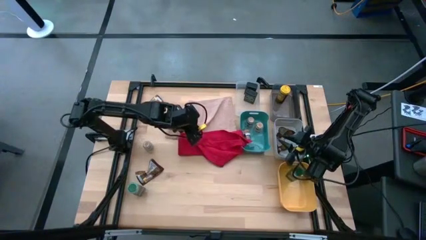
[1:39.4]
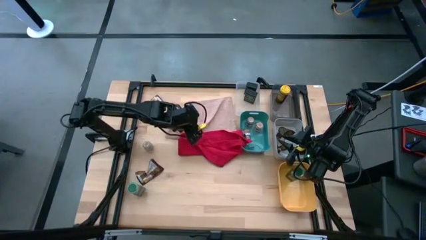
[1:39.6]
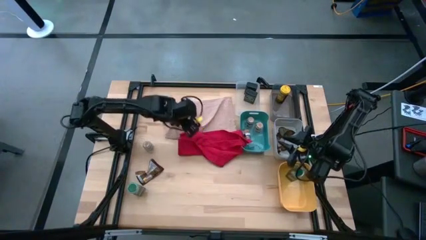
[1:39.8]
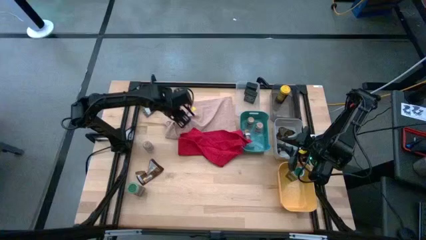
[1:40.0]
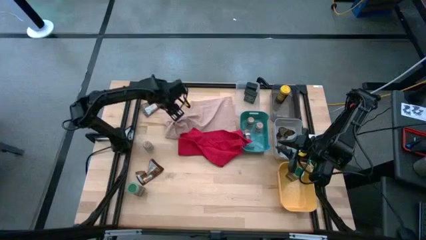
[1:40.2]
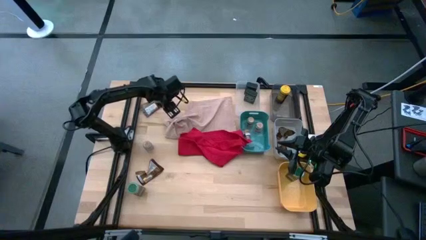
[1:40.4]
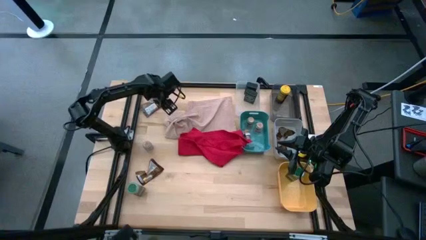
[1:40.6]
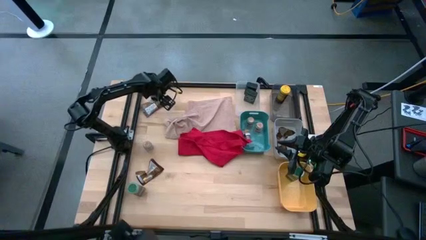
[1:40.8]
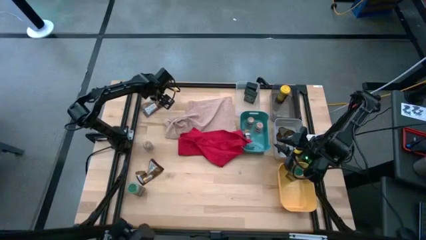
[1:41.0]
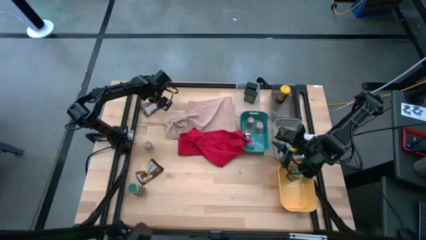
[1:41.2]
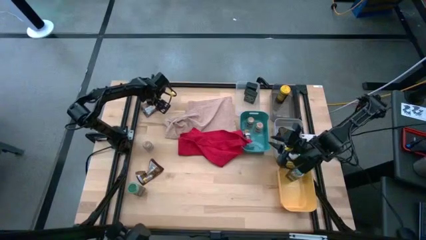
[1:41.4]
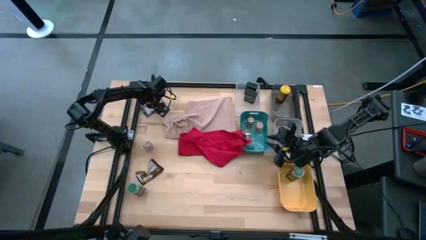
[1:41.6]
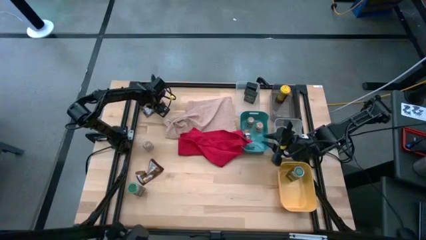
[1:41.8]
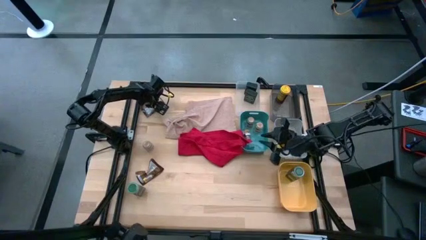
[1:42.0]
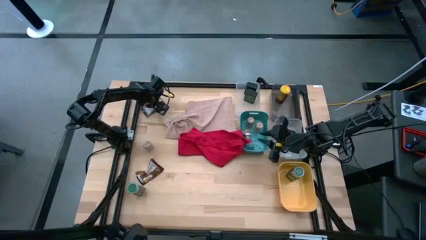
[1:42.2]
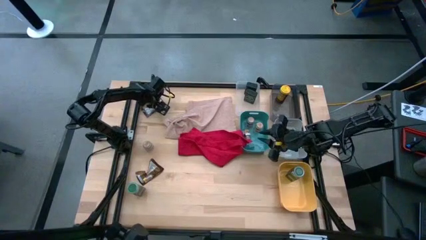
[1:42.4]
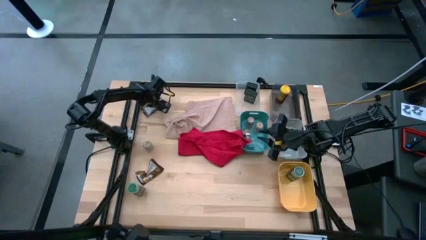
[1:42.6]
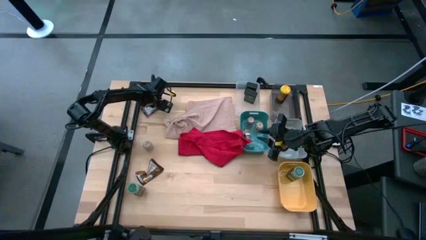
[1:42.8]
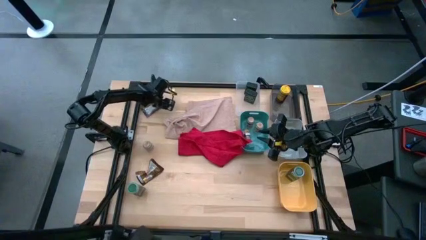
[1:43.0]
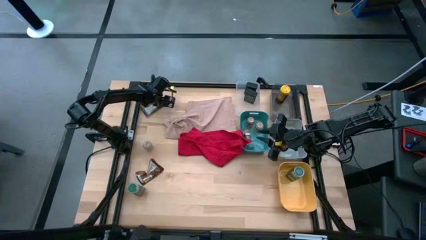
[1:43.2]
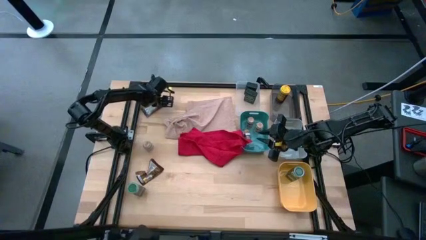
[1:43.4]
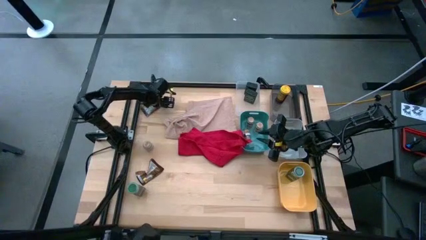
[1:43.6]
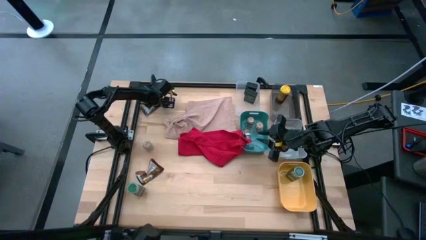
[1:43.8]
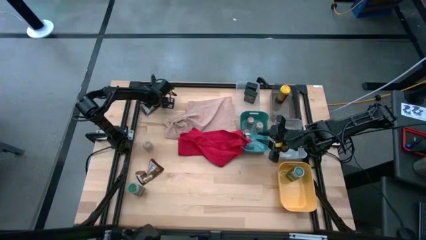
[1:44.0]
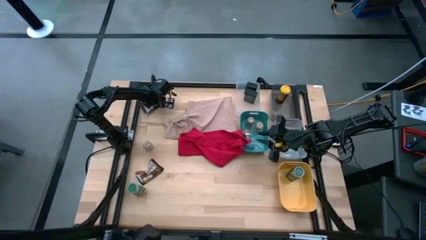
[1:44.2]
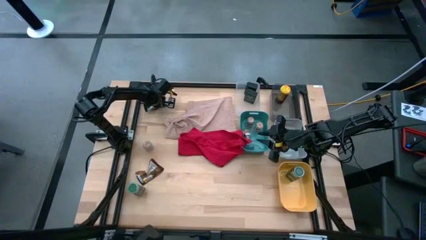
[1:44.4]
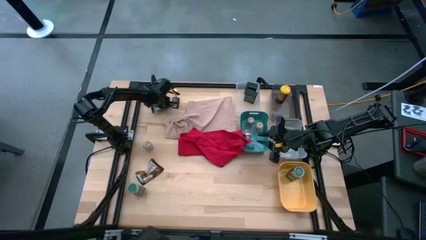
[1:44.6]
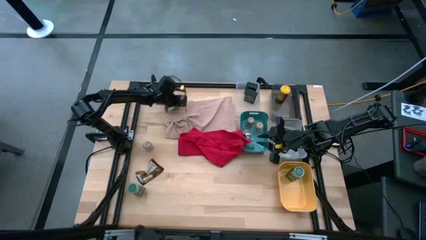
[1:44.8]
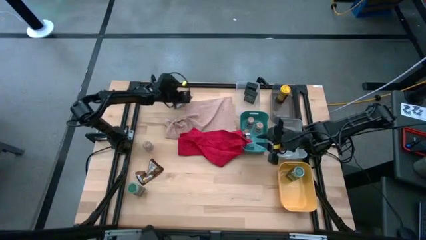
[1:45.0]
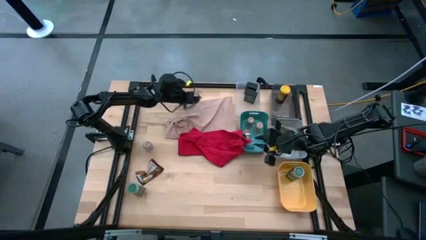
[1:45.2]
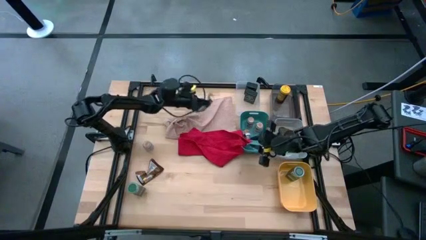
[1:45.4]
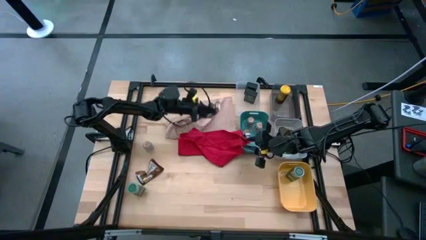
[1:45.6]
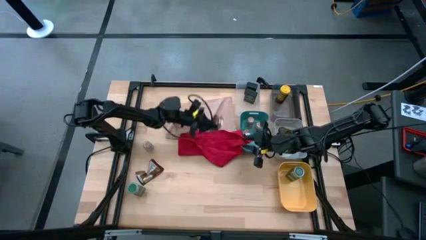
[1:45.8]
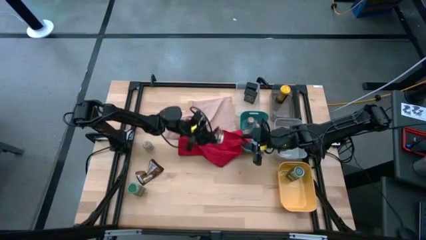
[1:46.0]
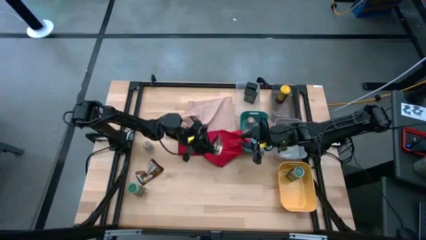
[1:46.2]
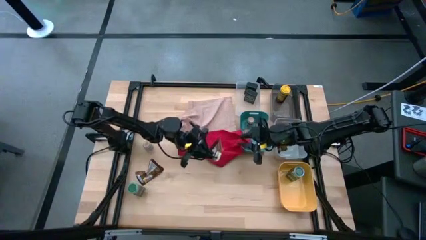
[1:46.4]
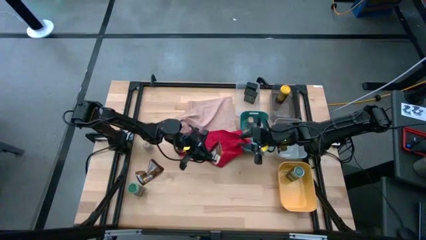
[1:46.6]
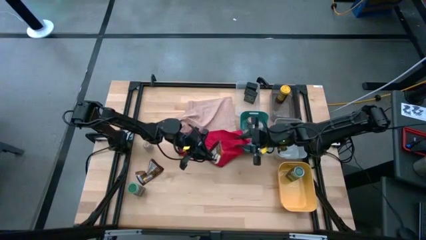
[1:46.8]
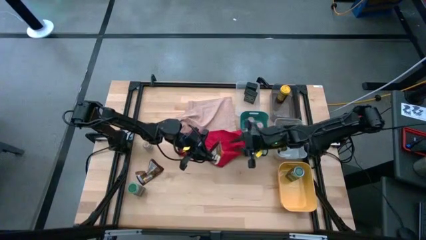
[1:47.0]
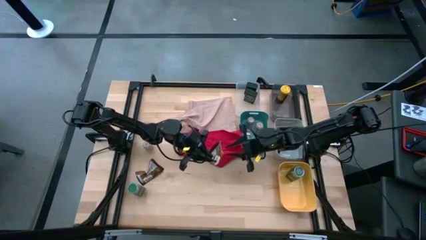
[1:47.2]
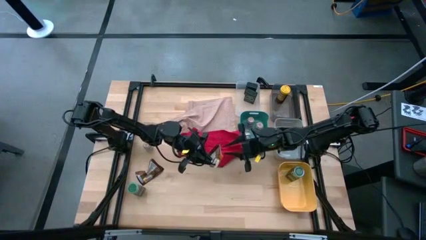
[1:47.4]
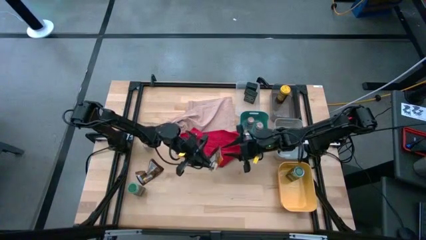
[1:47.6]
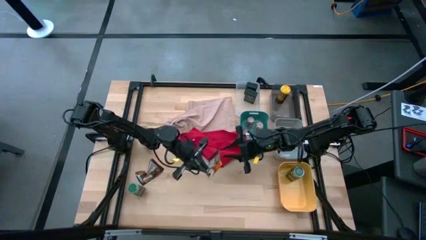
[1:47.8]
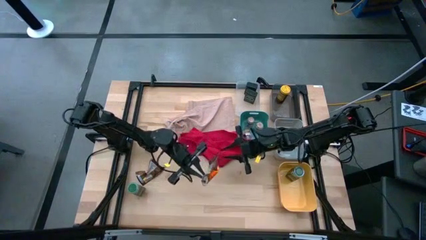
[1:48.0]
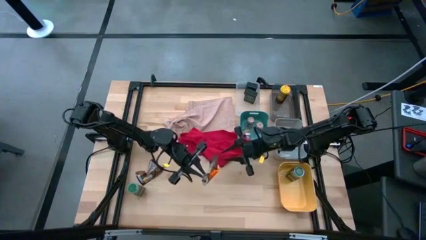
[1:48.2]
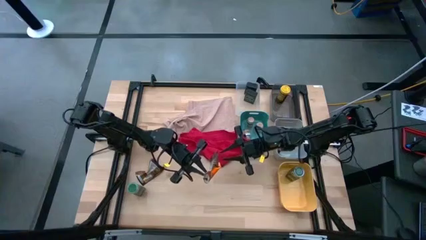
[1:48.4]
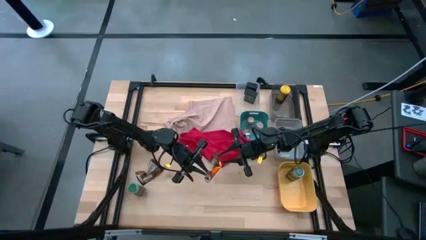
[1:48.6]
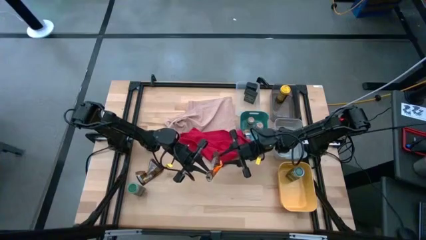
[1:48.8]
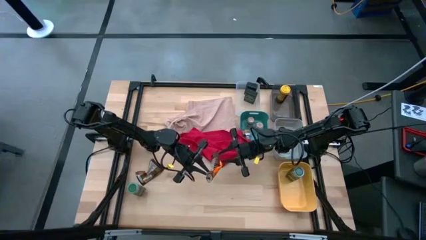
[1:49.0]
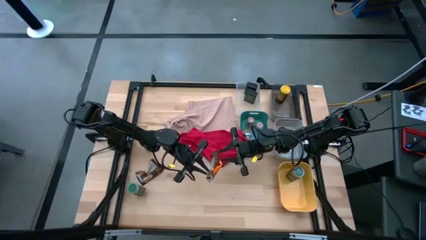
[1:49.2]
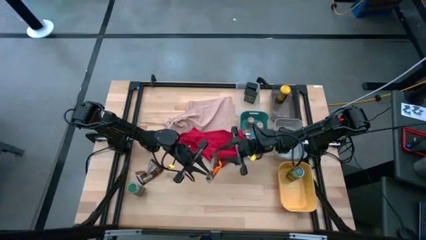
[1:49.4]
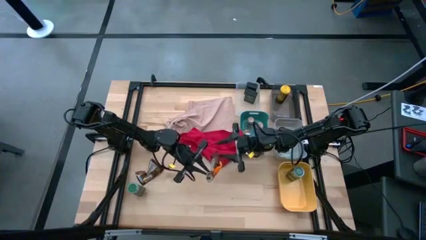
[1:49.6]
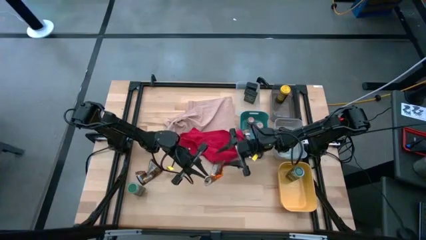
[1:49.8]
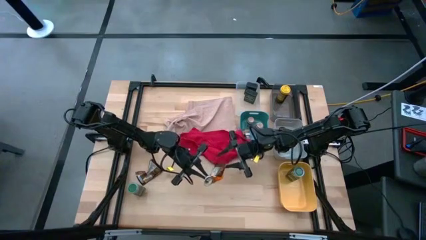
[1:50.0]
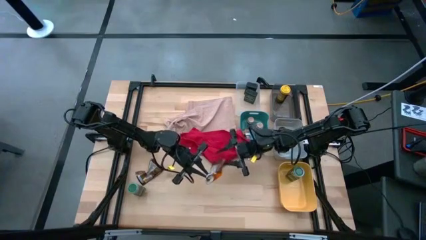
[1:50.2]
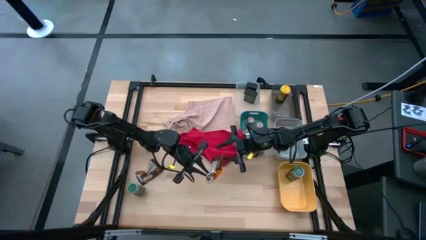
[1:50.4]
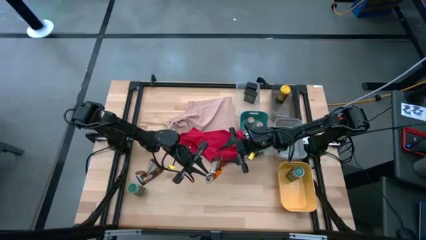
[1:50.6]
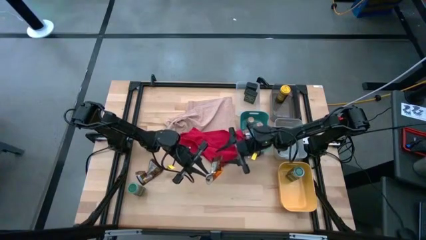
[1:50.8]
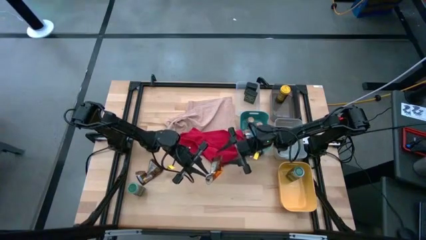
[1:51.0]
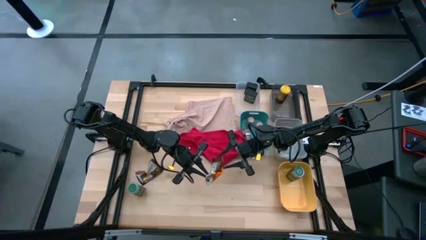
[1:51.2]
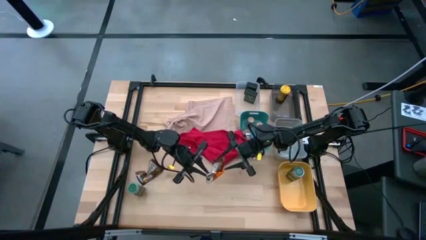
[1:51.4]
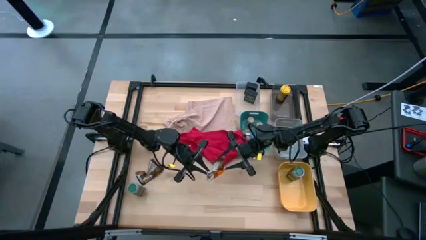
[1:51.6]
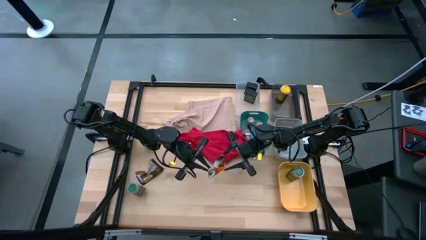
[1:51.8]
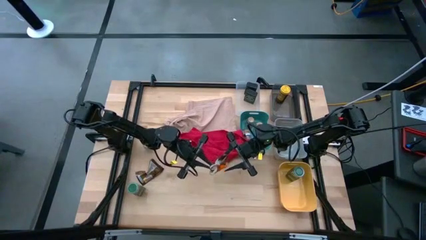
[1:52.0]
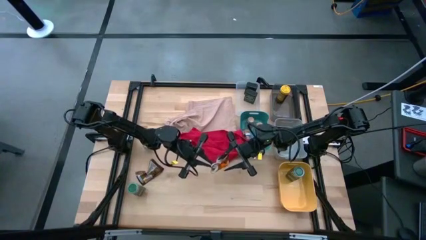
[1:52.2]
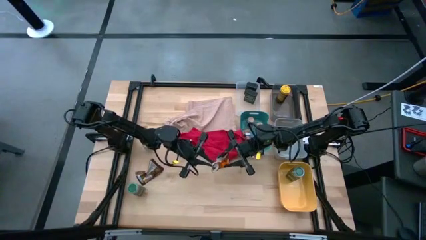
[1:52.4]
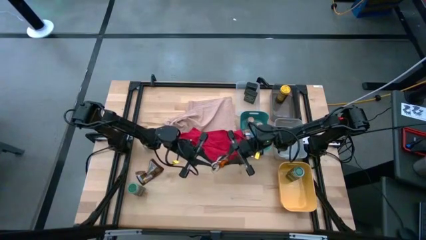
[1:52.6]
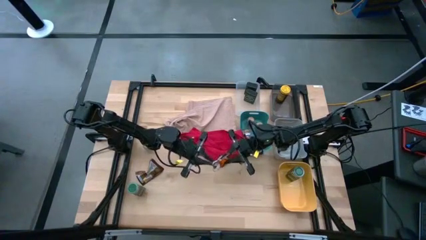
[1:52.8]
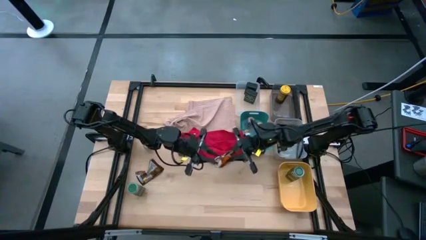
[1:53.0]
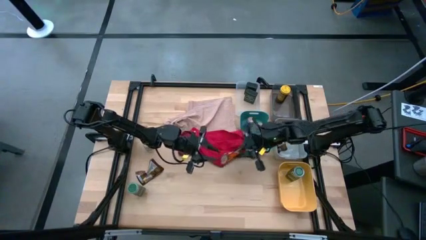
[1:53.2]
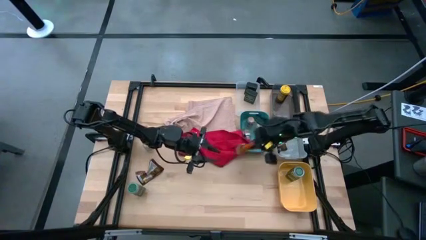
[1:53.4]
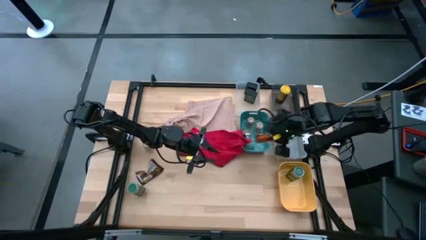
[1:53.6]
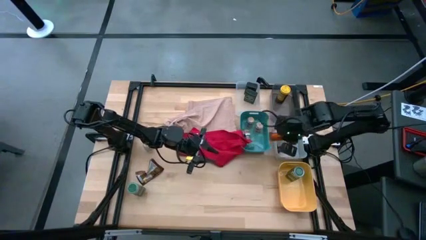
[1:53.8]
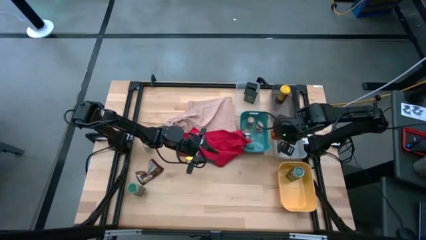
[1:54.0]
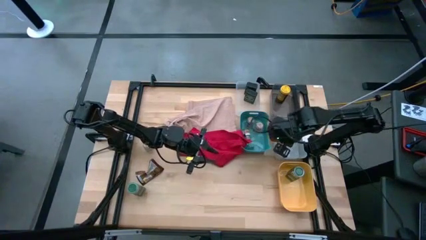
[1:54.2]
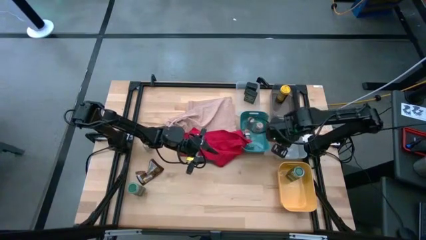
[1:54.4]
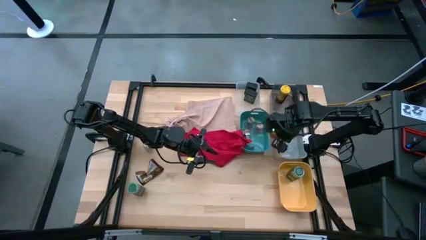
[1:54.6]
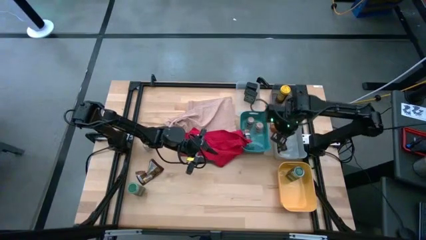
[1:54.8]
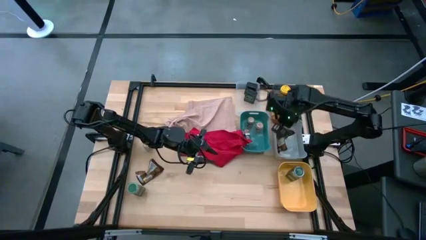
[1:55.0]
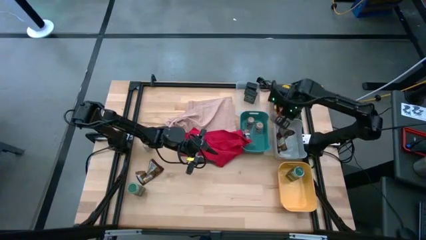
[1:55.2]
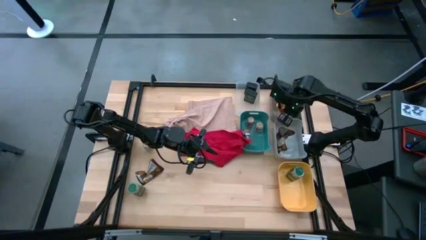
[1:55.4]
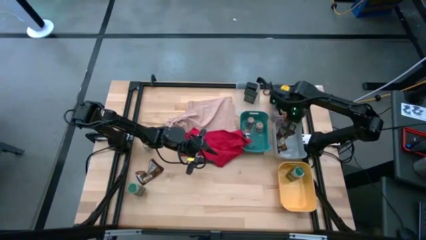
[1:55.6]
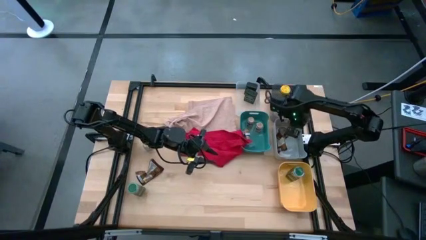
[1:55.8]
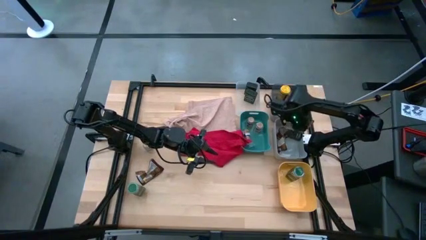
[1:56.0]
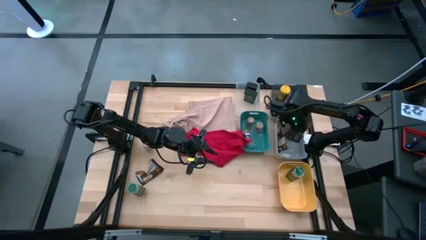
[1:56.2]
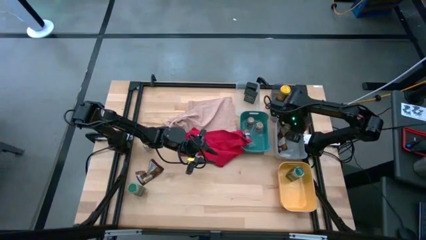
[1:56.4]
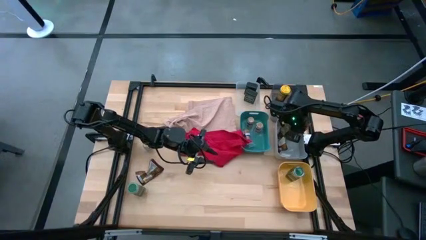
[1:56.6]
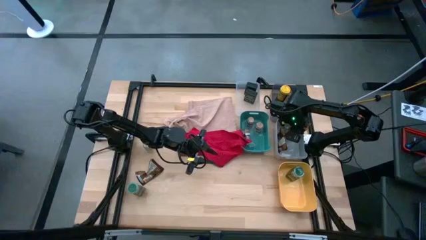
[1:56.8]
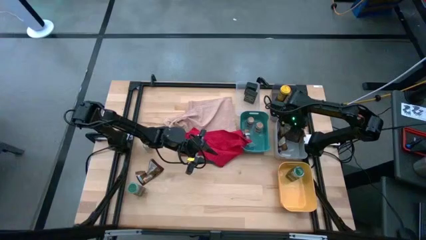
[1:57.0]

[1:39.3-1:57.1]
Task: Sort spices by type
Put the top orange pouch seasoning into the light blue bin
